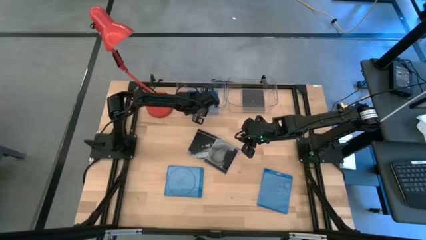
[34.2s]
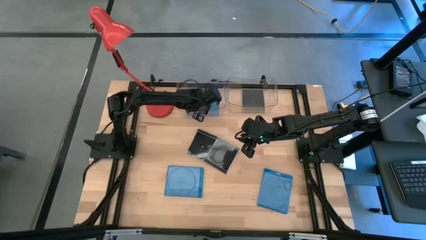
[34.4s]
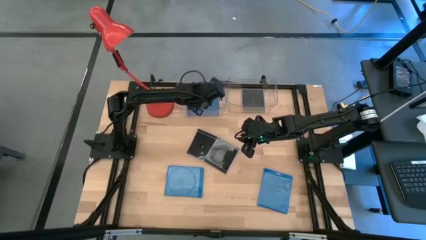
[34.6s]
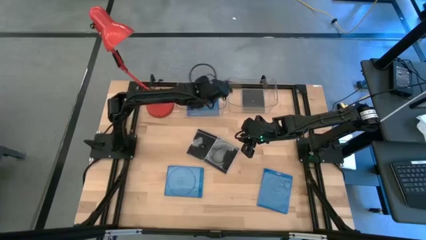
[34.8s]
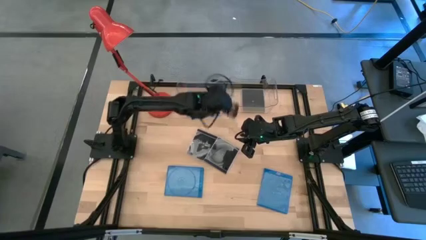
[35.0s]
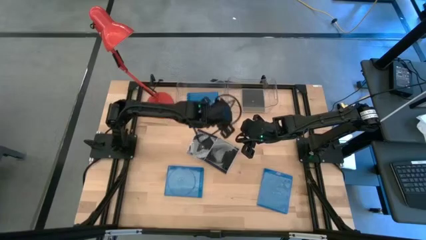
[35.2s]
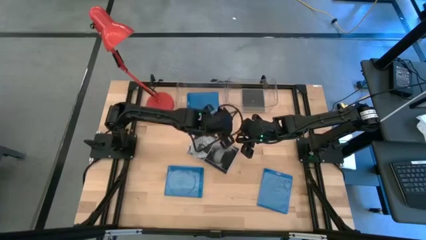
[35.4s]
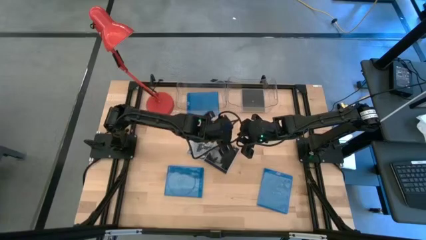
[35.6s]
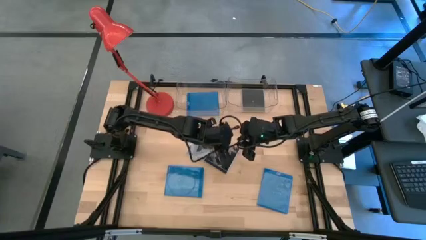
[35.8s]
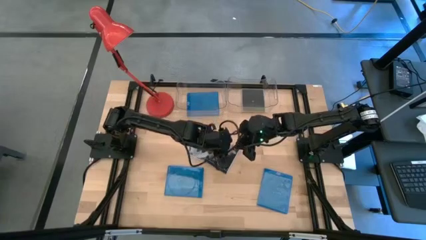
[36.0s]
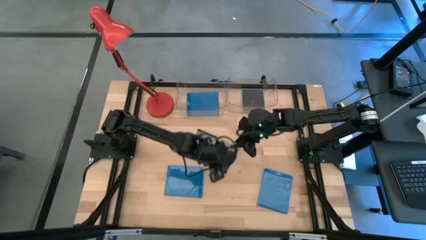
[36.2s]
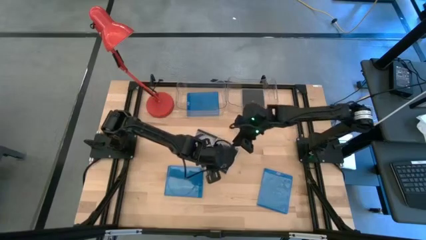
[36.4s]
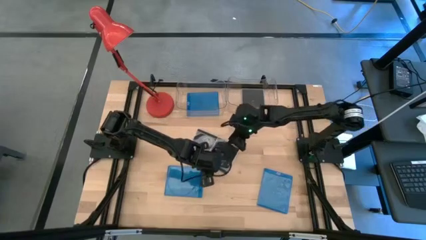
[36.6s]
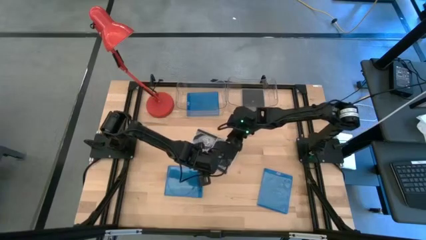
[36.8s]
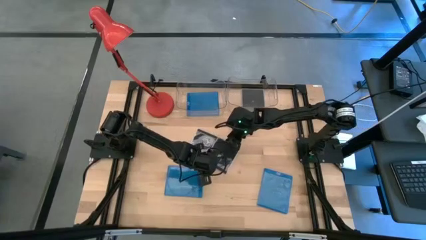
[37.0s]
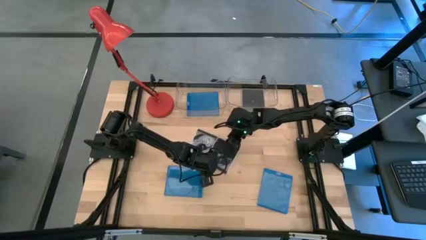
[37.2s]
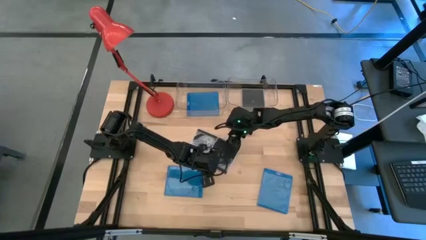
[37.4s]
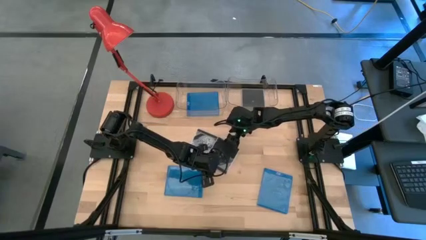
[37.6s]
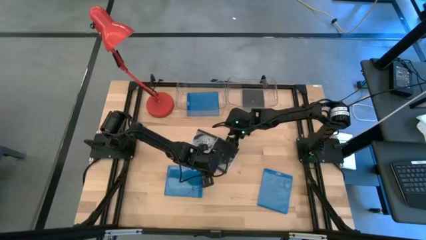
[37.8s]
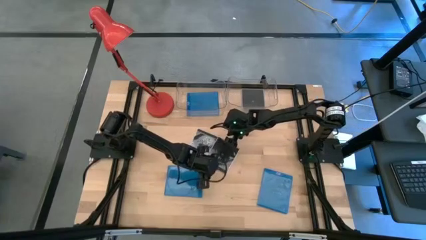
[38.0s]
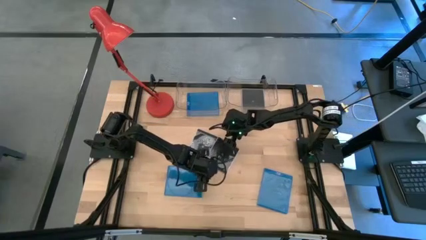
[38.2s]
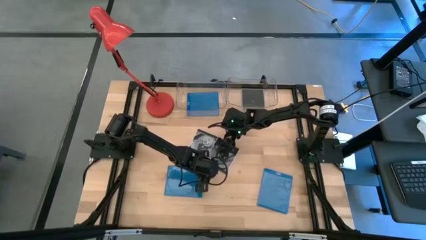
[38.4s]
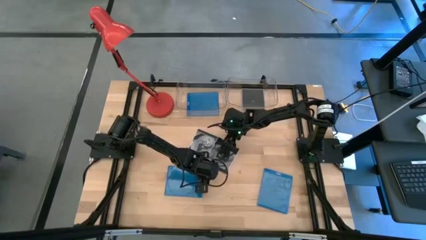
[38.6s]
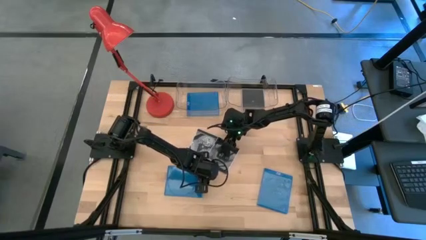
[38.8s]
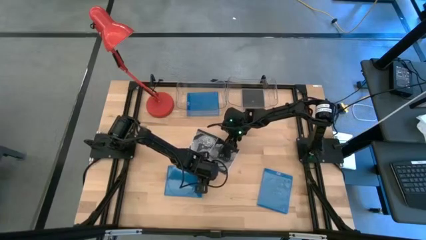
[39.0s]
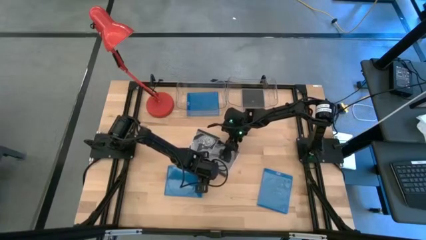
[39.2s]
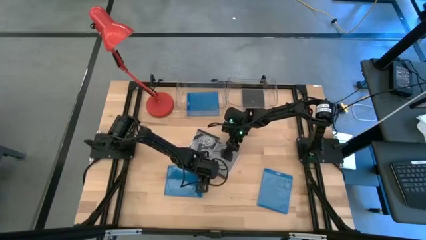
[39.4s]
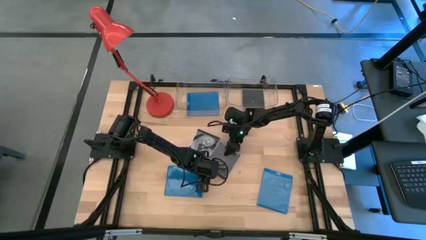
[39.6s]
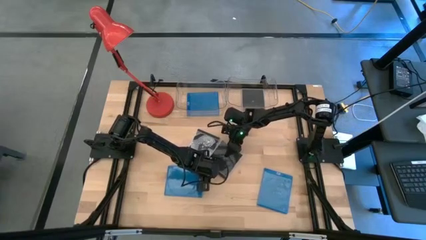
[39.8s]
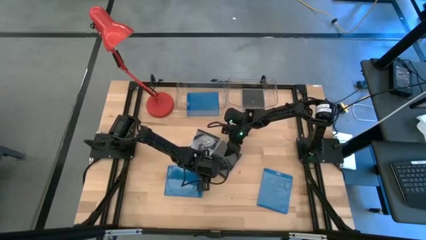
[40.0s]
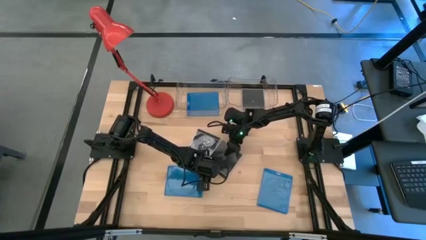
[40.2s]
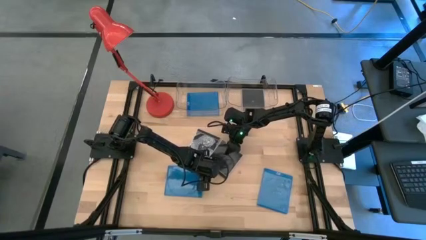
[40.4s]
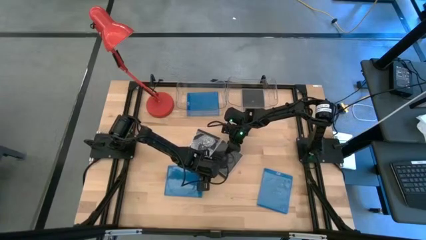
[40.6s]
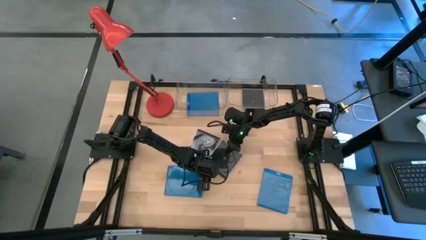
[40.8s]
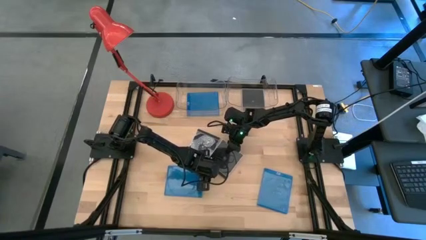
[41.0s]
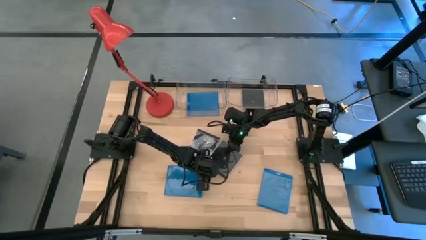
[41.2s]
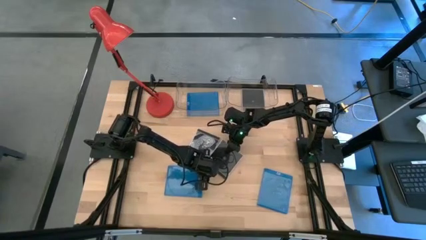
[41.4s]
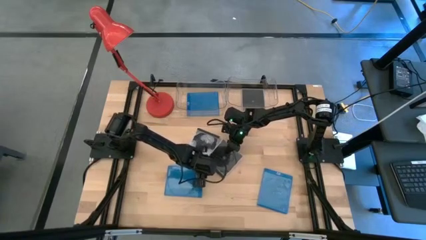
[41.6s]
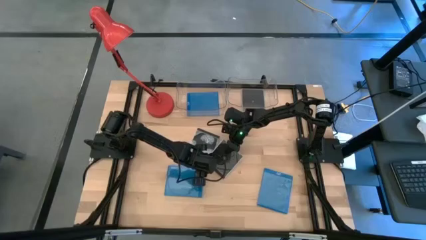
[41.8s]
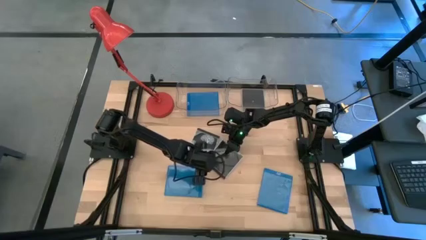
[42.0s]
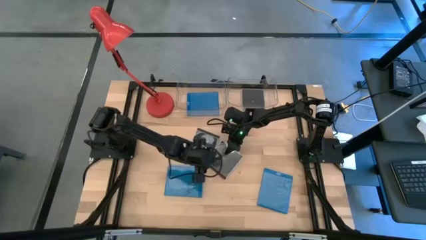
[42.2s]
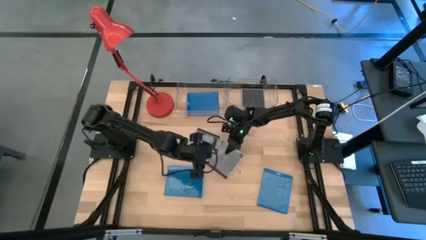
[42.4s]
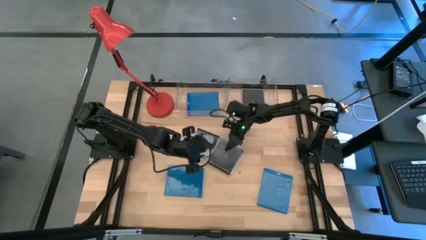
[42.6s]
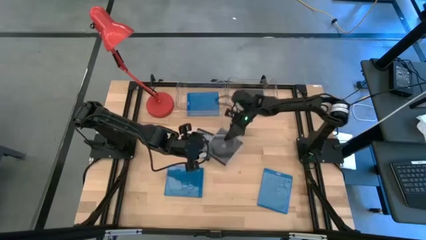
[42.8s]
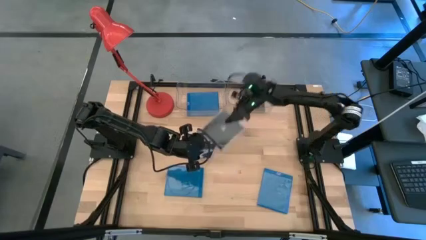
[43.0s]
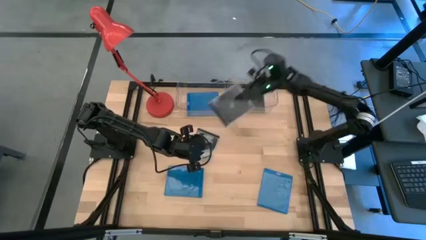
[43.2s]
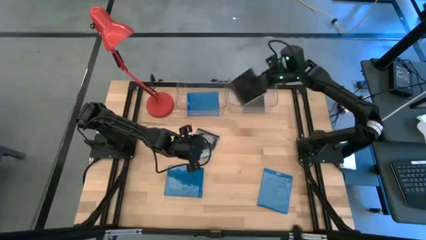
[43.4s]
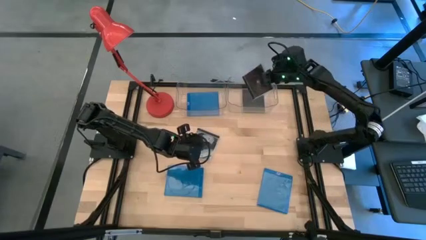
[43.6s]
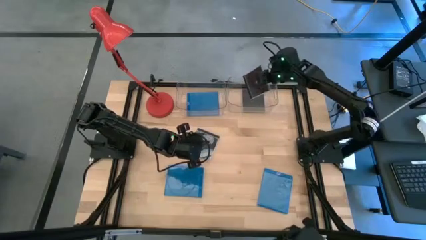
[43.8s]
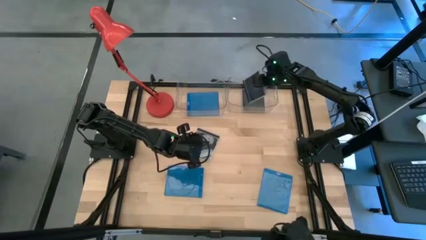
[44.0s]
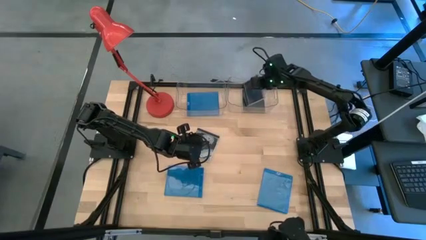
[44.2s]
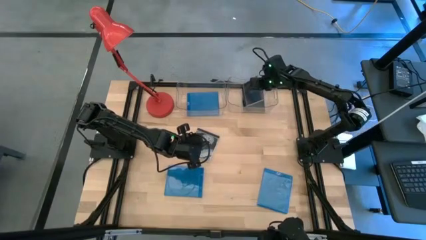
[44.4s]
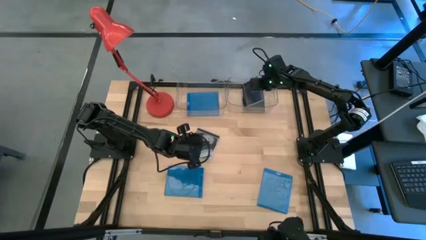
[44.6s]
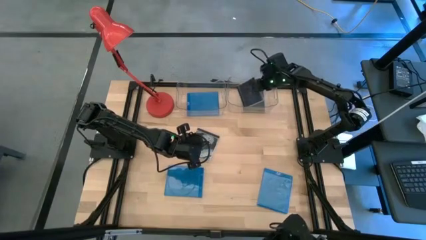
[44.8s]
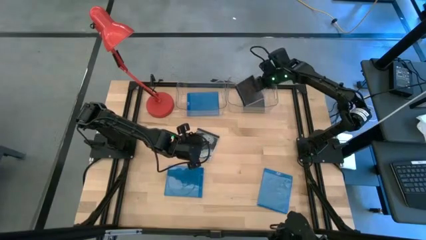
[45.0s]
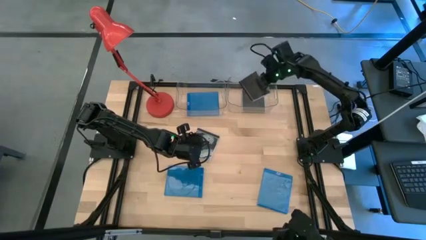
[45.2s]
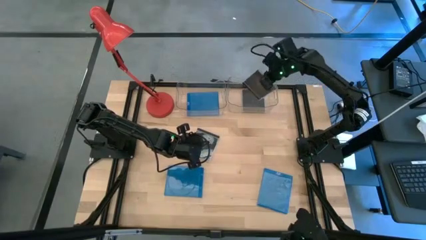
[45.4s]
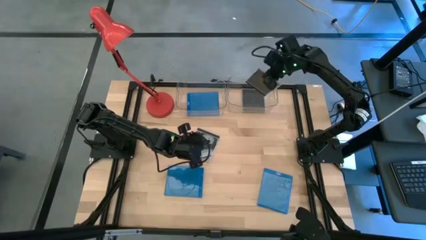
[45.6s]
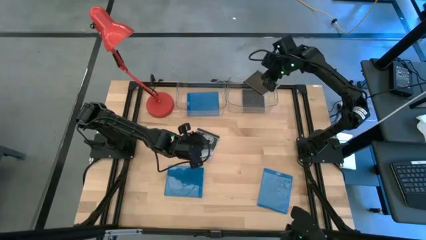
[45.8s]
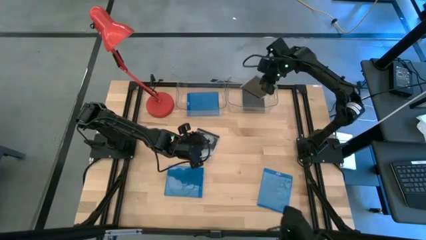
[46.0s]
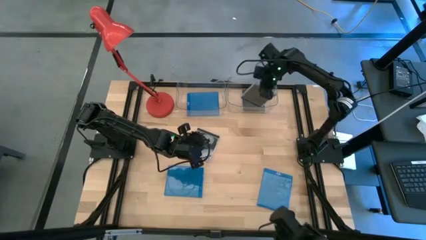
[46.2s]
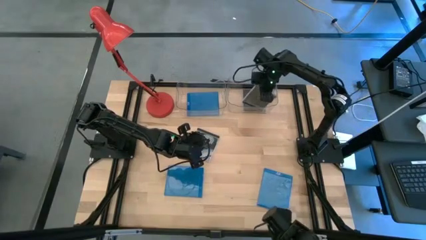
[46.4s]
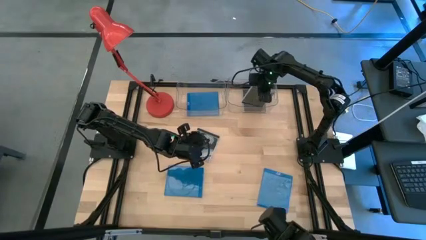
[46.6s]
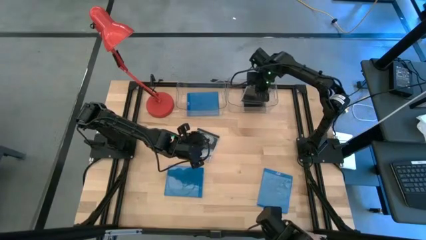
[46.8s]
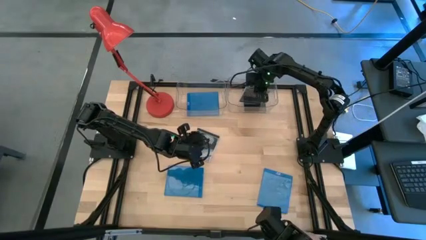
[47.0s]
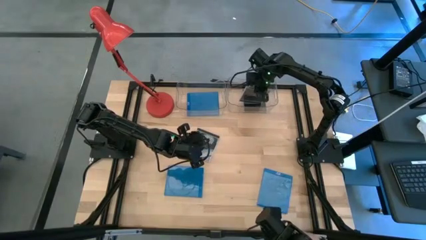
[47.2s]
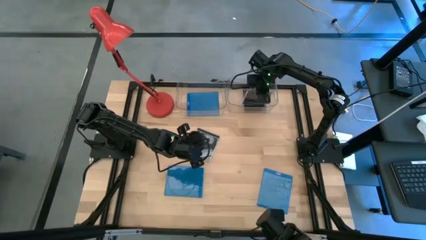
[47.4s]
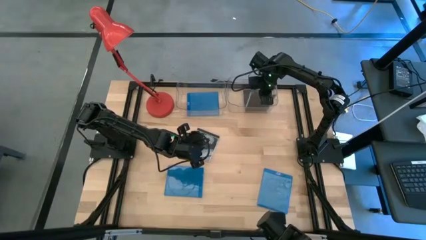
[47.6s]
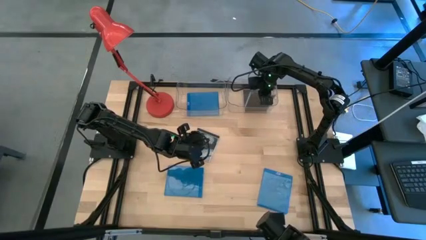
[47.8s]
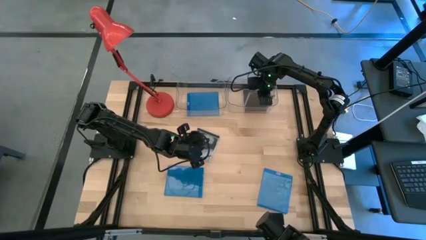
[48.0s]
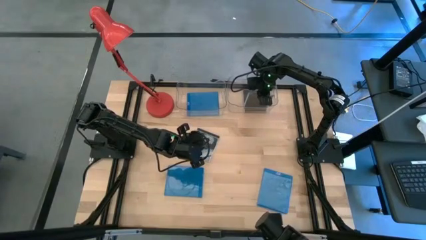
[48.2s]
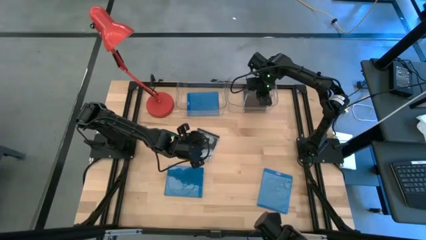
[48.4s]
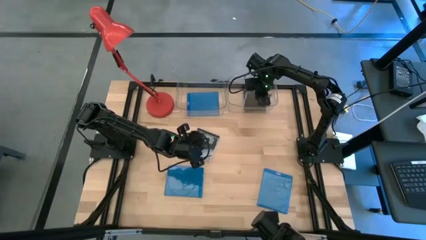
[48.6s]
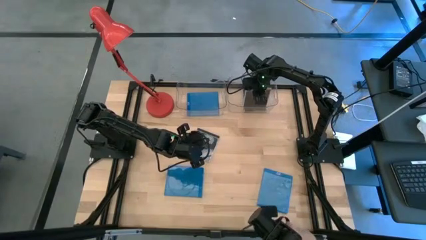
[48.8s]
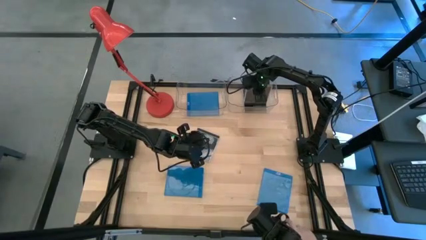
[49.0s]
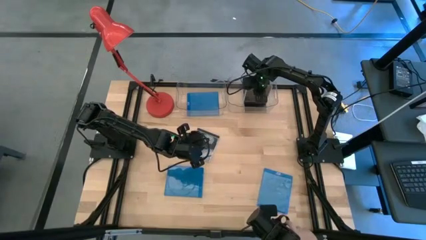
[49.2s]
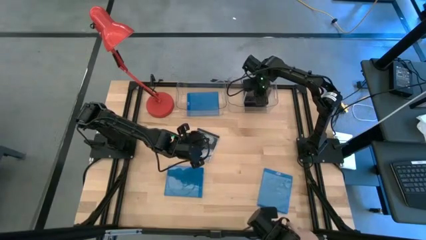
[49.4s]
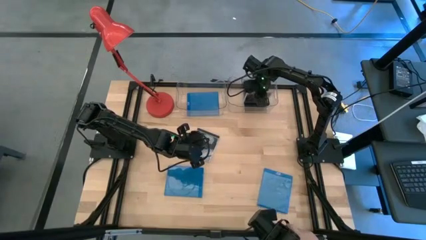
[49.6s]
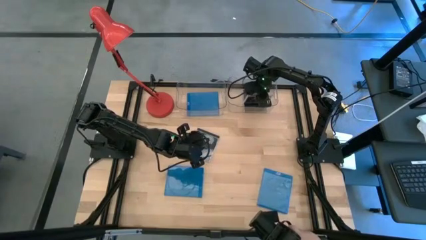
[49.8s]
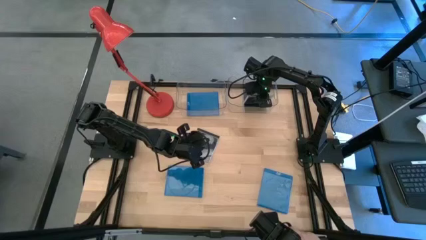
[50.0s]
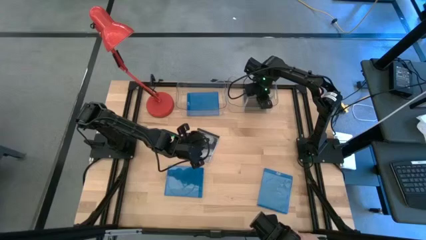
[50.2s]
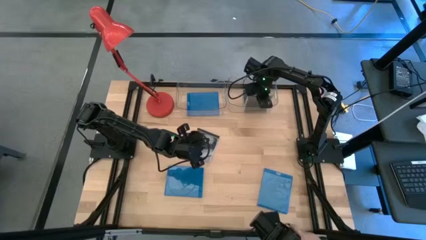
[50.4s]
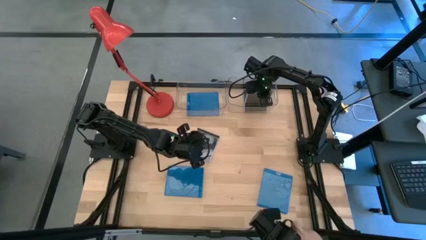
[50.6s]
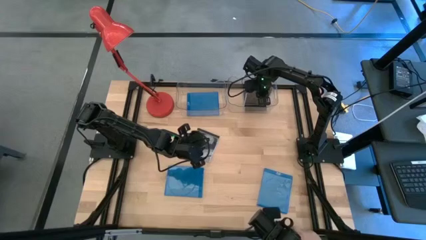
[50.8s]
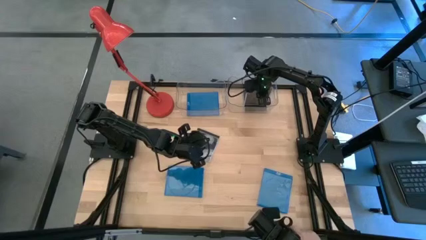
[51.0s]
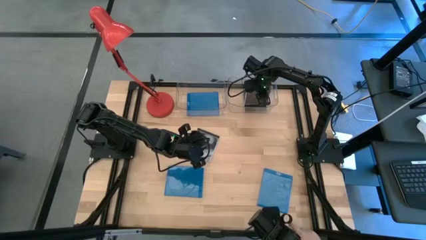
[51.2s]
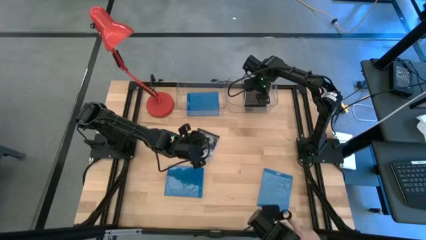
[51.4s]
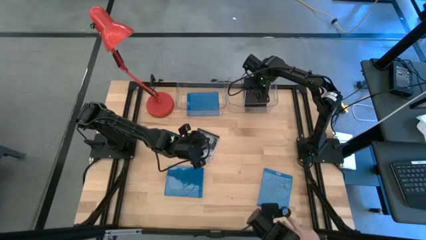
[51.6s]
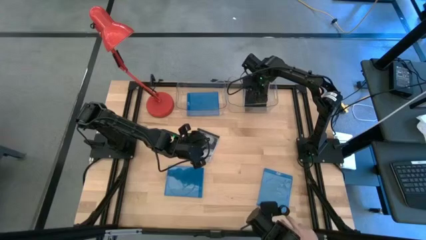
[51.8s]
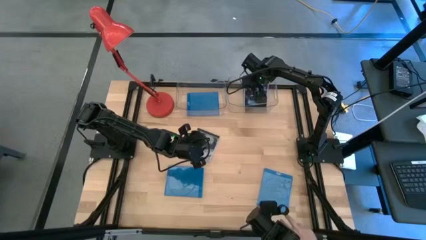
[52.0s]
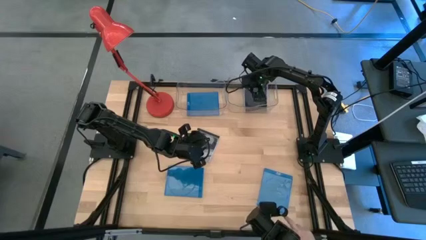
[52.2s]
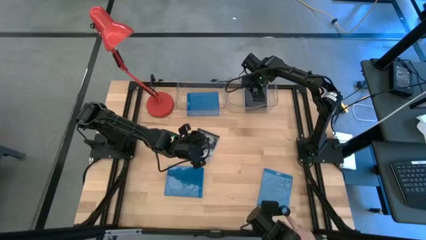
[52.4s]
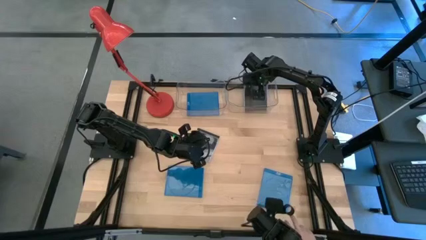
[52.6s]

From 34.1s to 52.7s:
Task: Pick & place jewel cases by type
Put the right black cd case into the right transparent bin
